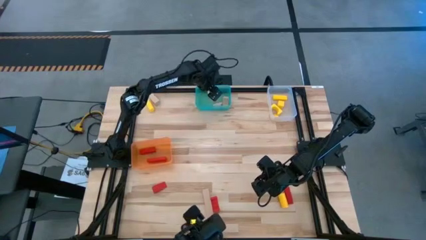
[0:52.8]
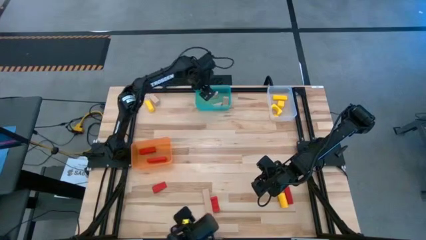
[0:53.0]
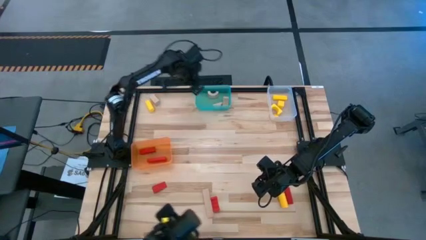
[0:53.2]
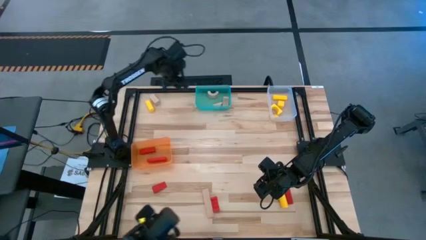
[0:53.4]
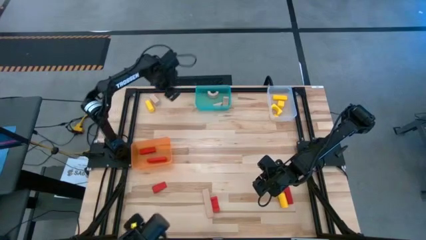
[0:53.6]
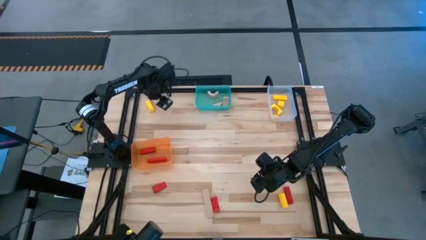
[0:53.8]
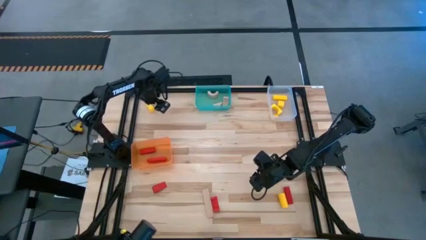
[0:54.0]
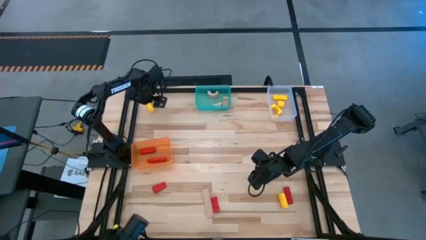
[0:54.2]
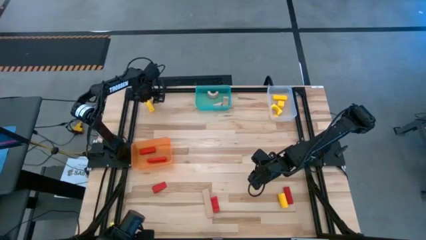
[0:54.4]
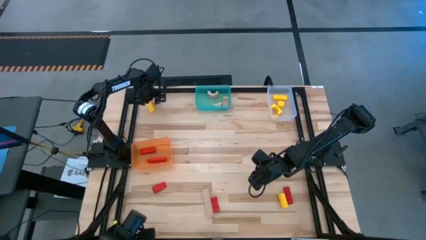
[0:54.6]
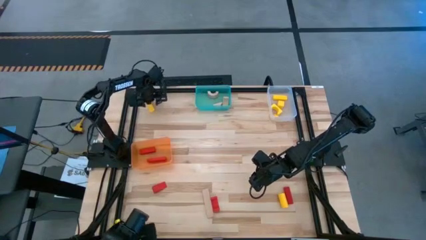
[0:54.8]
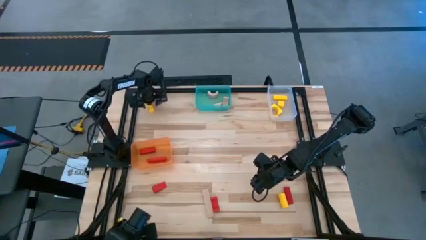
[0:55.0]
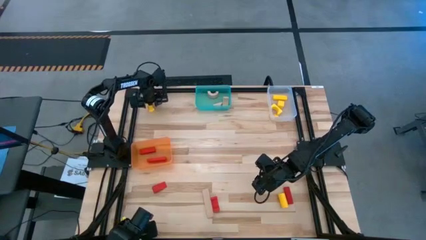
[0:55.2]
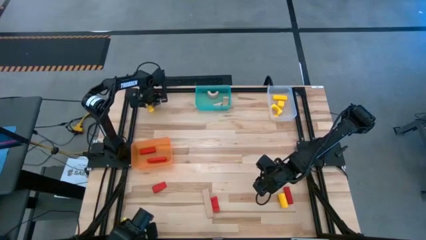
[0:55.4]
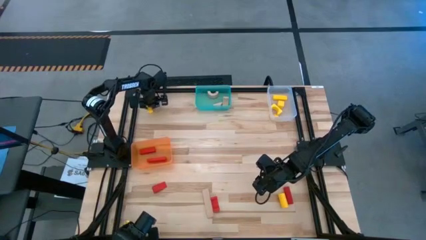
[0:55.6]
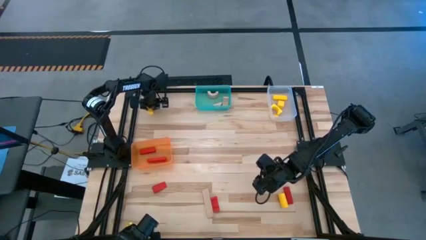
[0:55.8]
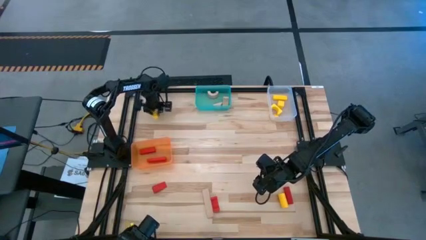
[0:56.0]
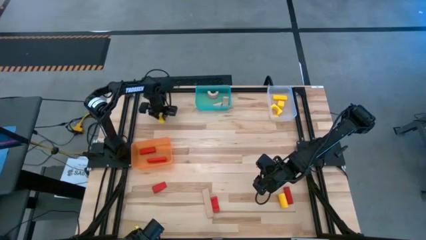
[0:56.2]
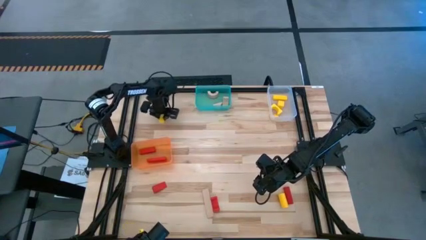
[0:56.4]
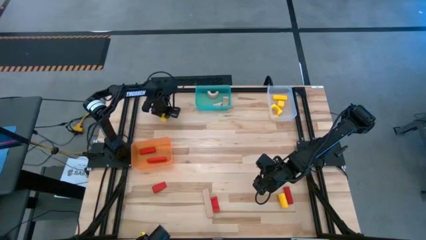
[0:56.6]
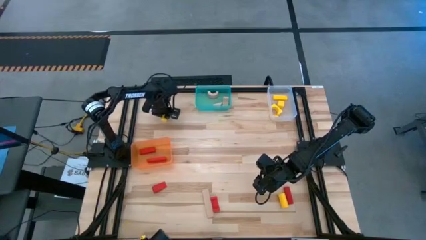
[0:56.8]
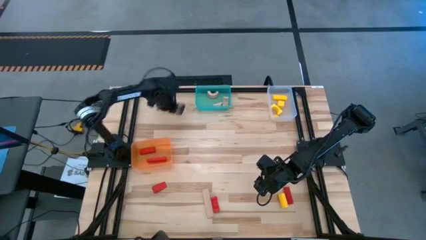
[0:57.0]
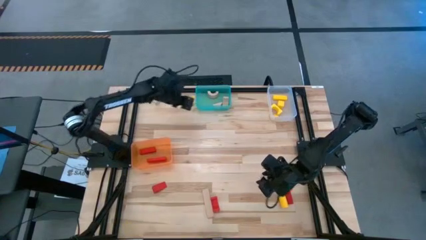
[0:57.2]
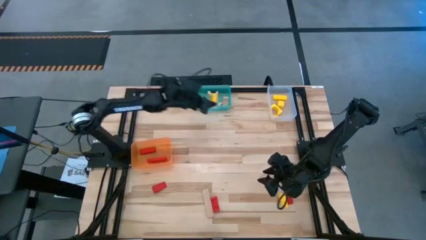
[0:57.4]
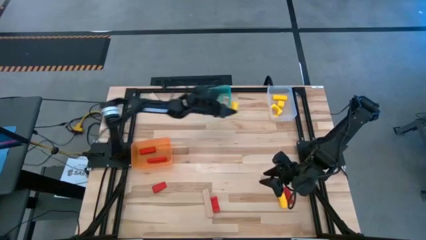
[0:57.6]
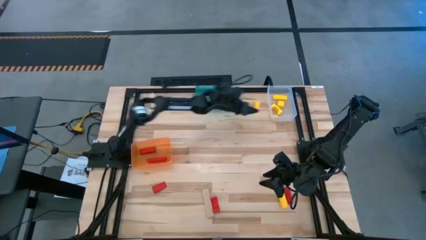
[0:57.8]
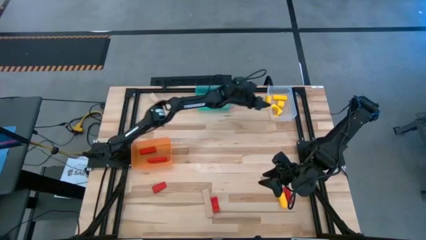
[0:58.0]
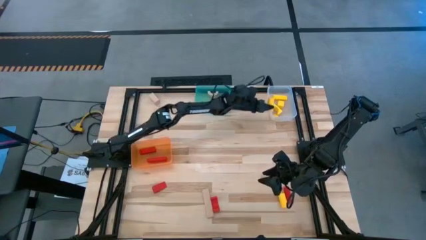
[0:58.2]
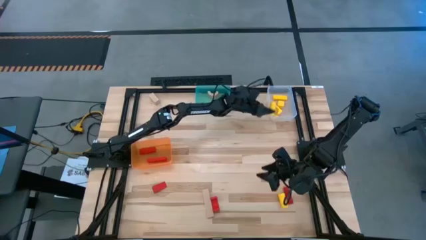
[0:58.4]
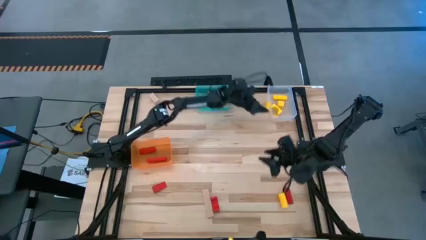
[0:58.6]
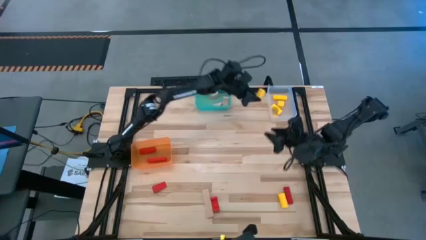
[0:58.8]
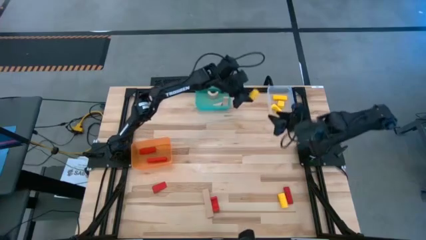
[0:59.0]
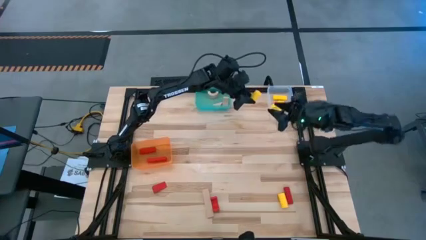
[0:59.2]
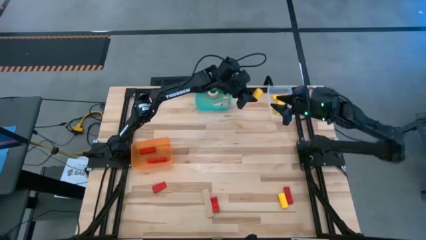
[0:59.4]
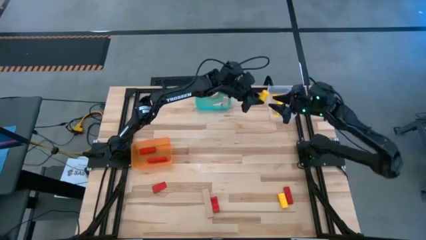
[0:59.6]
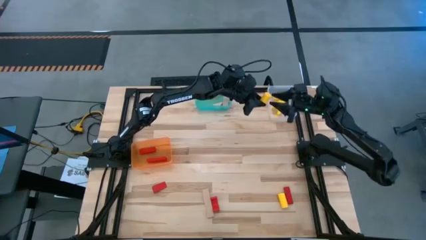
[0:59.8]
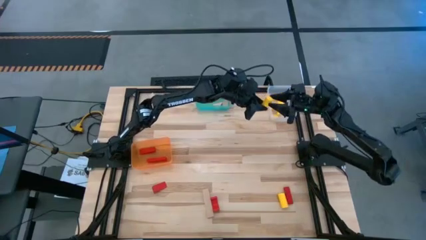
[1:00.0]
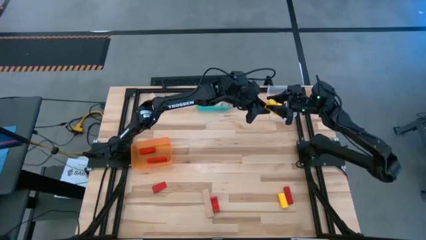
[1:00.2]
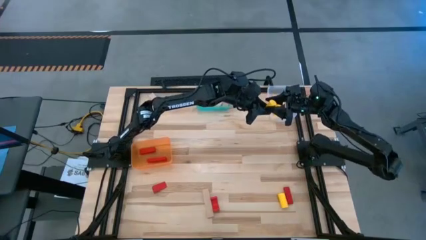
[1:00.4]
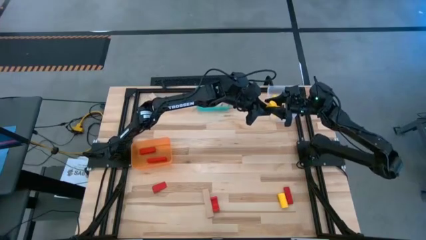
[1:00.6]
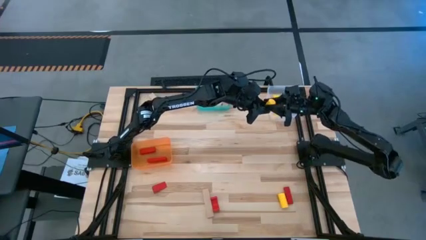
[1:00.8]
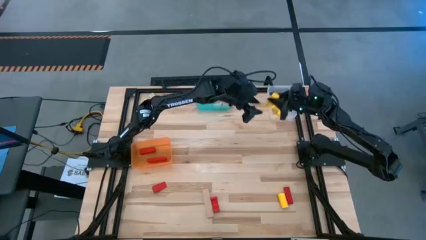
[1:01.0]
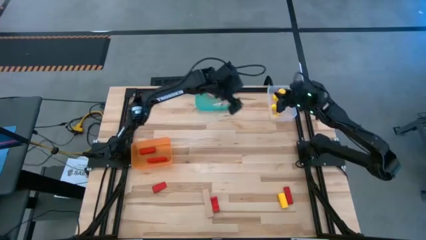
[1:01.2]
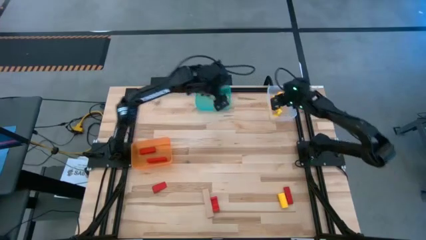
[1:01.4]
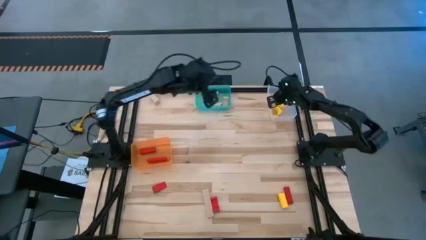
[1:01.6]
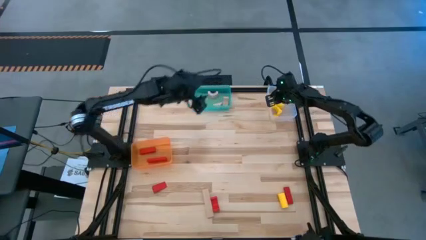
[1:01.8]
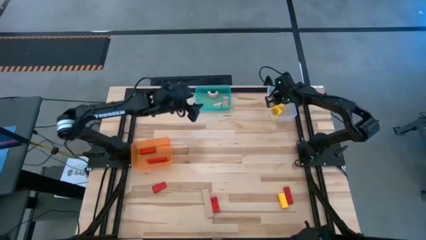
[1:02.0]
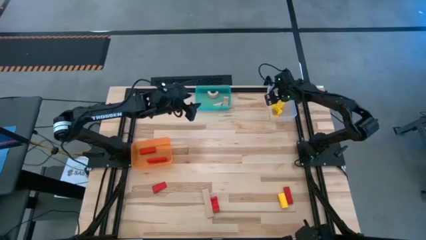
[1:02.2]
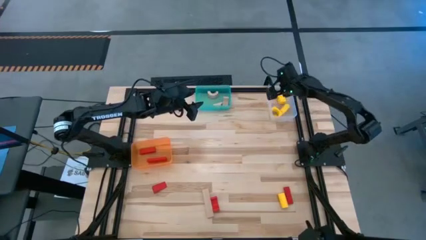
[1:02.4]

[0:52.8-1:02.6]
Task: Sort & place blocks by color
Put the yellow block into the transparent white bin

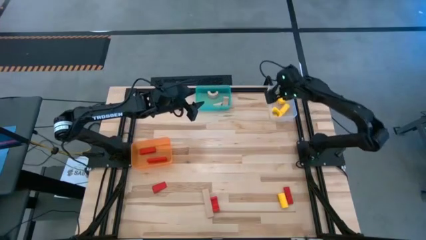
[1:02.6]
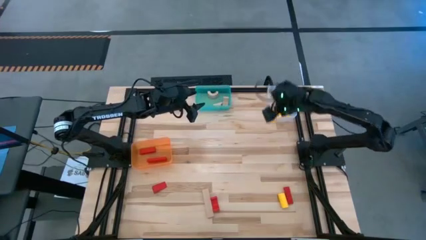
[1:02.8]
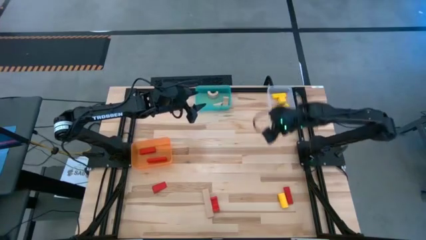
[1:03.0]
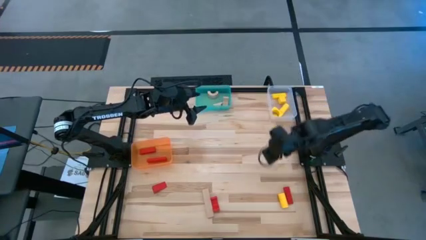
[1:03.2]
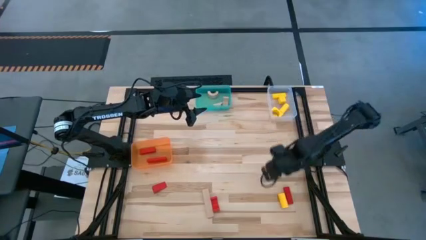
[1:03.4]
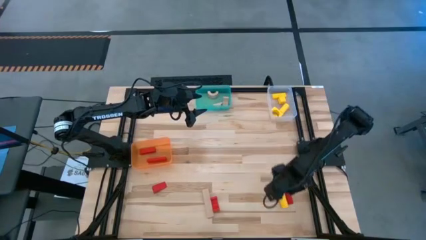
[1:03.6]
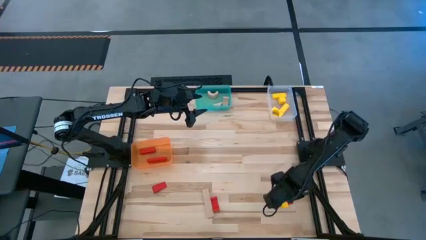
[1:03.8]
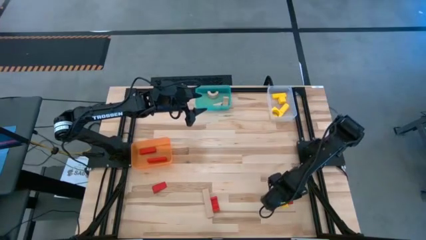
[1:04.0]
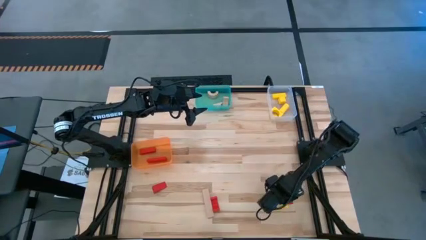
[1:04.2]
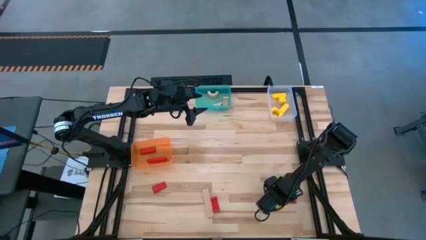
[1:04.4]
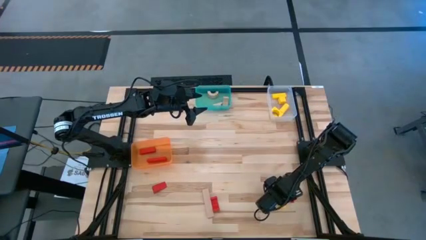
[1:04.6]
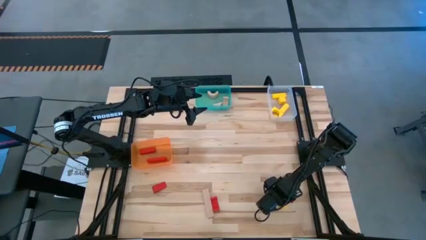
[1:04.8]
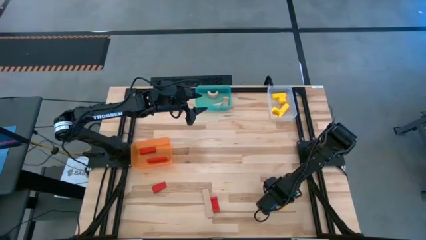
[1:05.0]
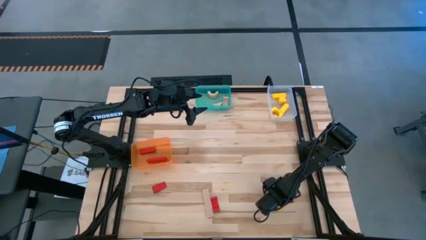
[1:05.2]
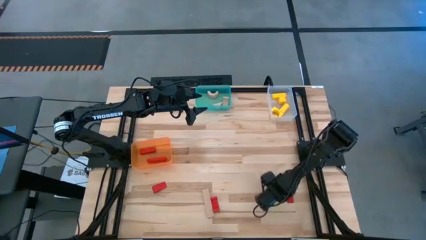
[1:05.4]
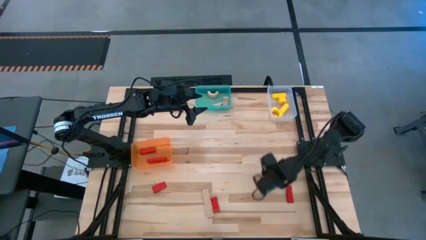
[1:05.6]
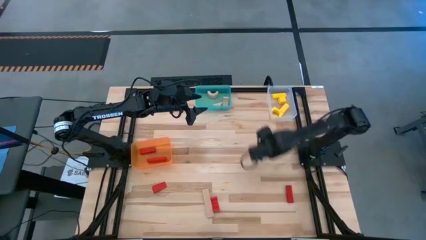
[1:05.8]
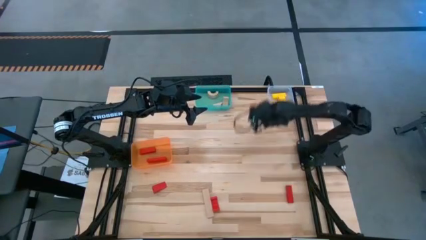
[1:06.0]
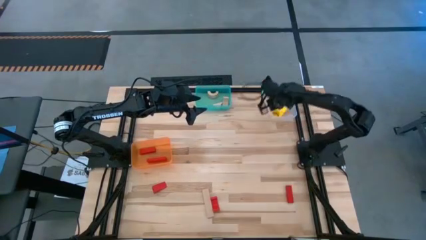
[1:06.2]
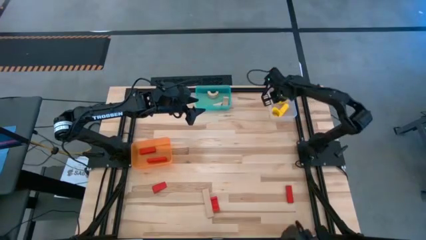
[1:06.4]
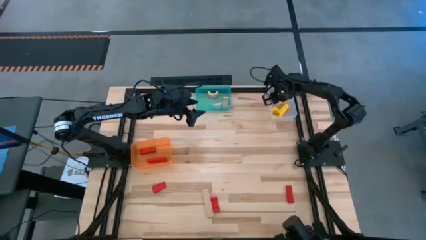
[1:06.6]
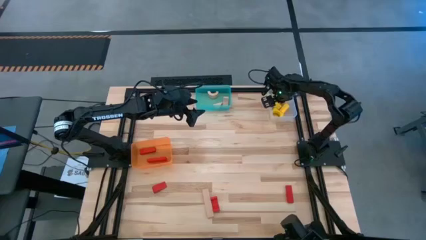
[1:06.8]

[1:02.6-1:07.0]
Put the yellow block into the transparent white bin

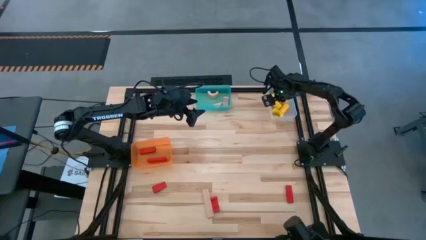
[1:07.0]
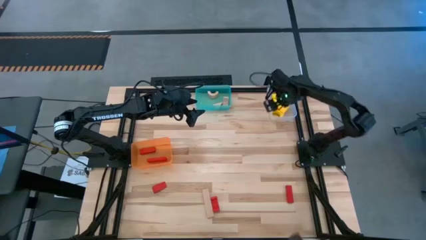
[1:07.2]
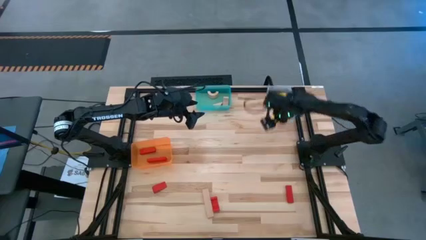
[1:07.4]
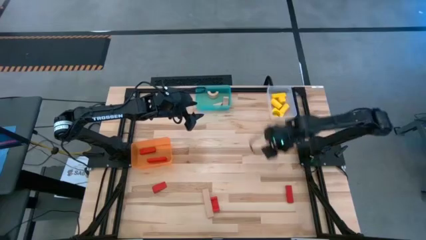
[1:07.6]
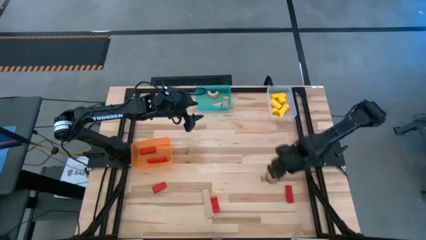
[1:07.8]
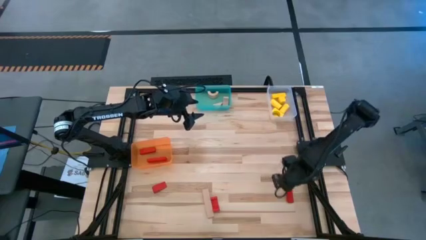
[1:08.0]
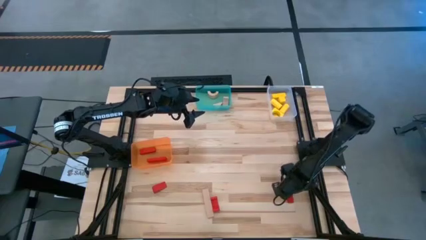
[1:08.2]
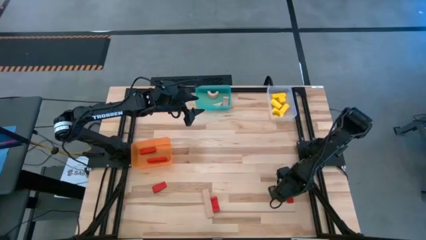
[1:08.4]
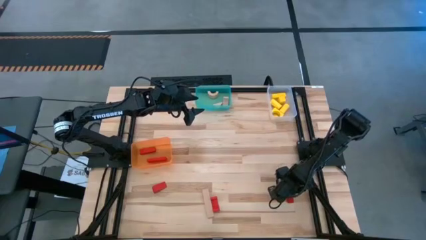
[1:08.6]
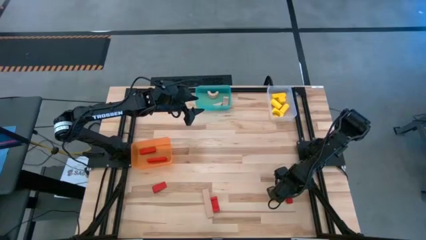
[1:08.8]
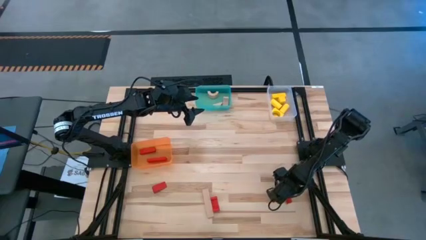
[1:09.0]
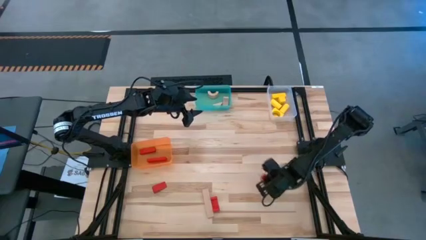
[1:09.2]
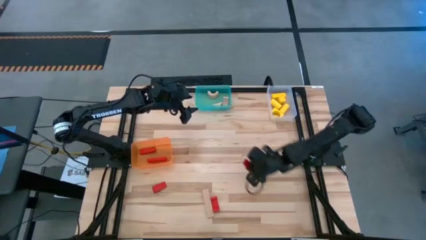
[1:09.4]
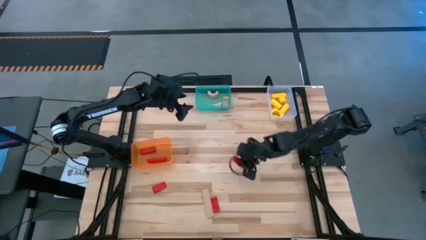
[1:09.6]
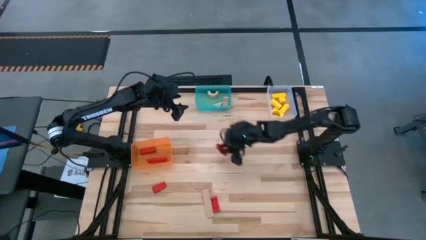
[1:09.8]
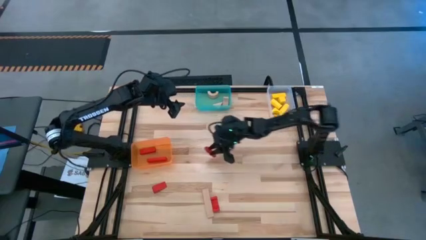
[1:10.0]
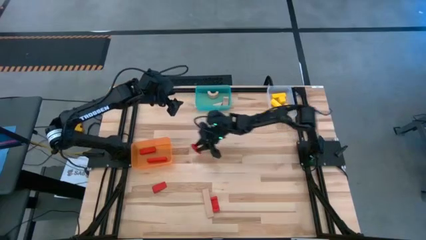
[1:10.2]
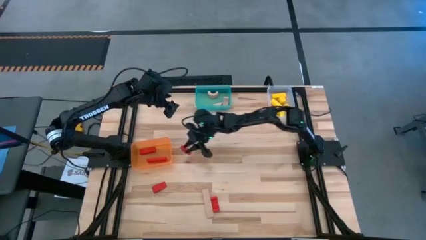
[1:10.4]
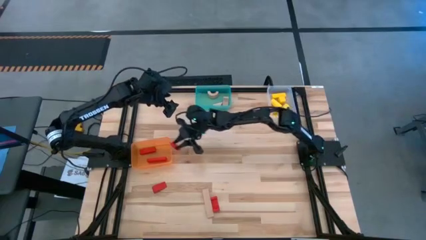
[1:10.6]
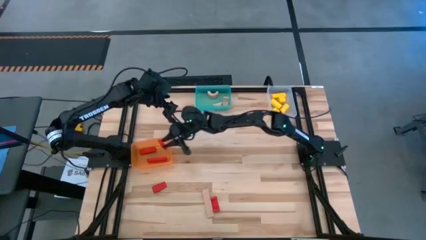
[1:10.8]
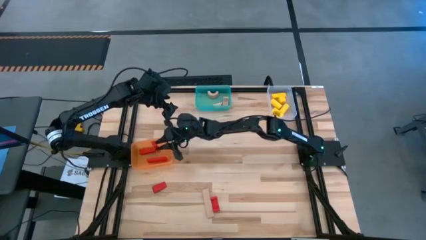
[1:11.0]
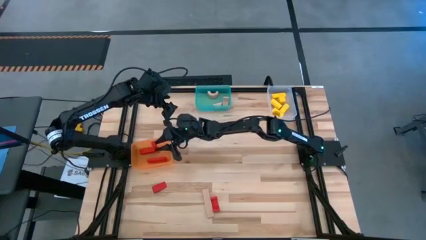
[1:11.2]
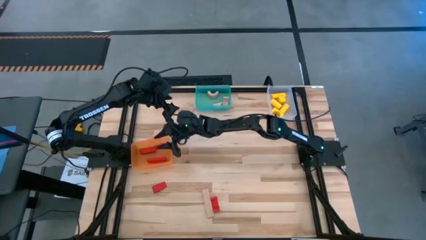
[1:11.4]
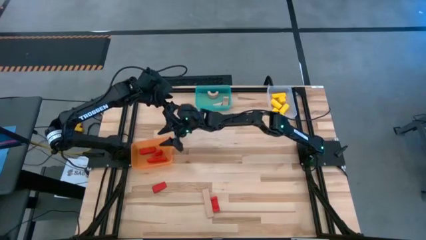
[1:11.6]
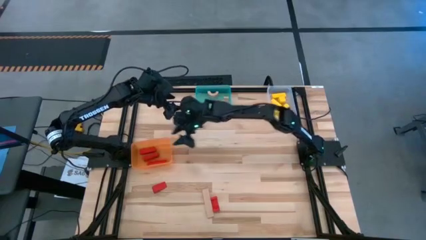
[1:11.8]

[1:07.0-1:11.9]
Put the red block into the transparent orange bin
